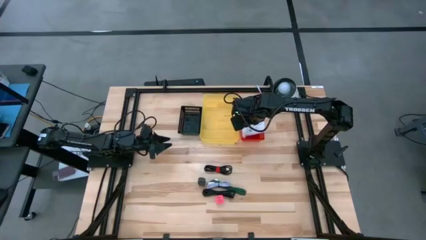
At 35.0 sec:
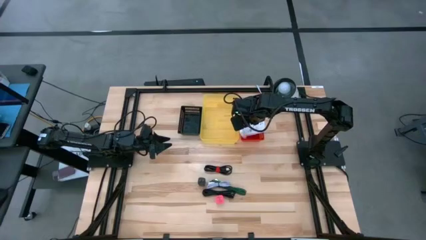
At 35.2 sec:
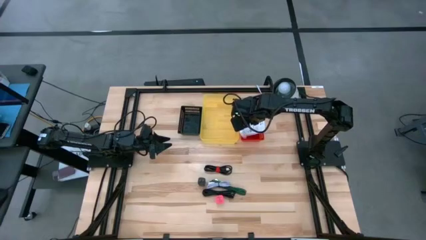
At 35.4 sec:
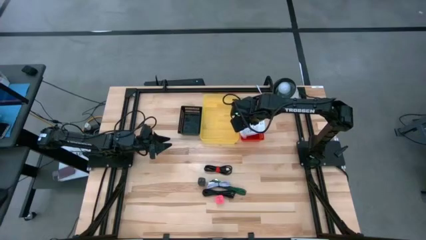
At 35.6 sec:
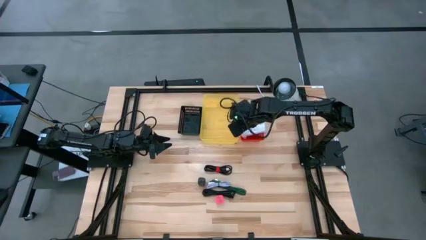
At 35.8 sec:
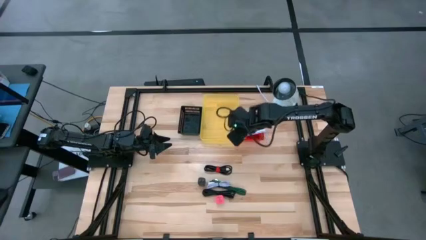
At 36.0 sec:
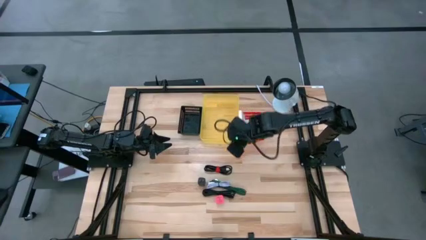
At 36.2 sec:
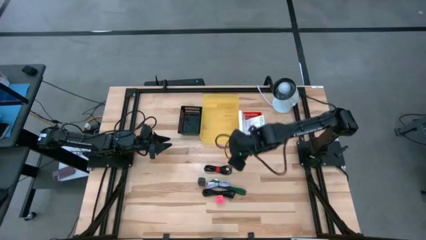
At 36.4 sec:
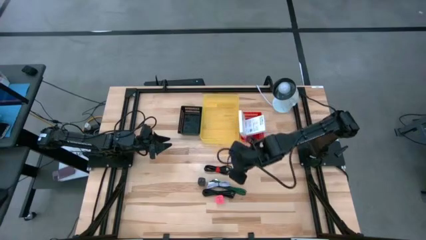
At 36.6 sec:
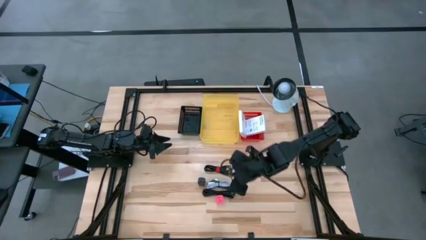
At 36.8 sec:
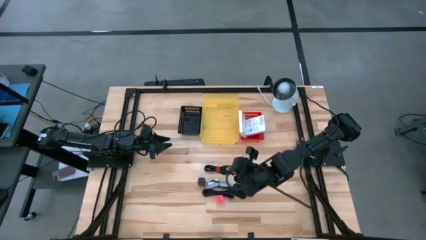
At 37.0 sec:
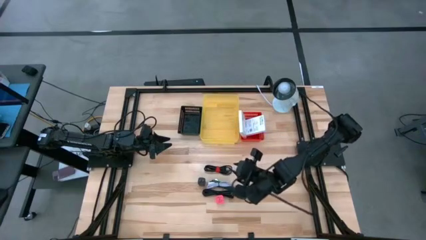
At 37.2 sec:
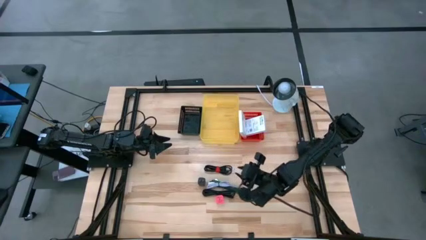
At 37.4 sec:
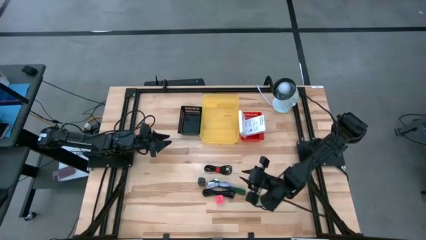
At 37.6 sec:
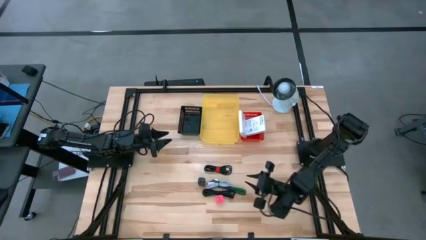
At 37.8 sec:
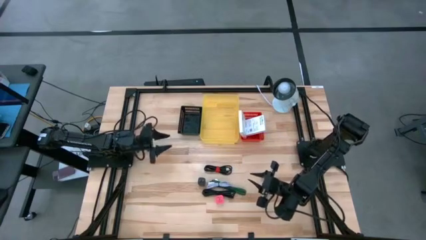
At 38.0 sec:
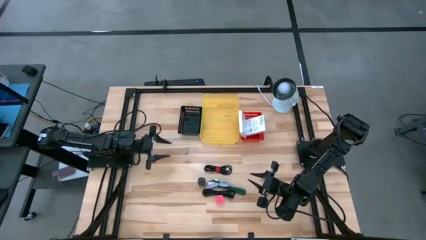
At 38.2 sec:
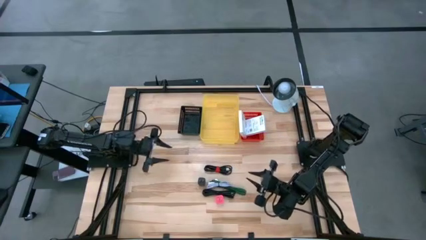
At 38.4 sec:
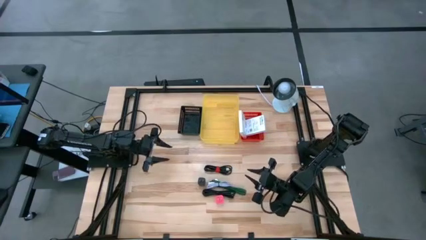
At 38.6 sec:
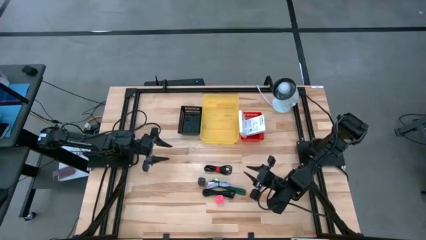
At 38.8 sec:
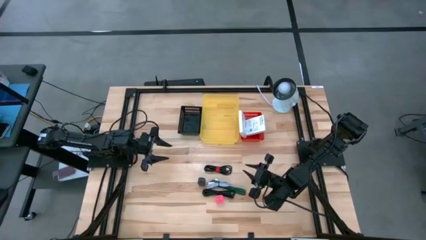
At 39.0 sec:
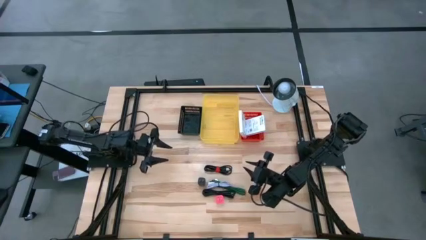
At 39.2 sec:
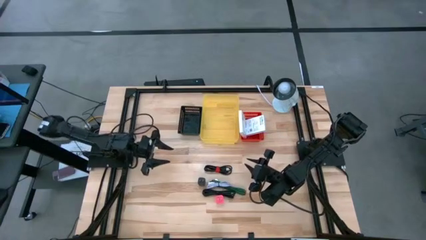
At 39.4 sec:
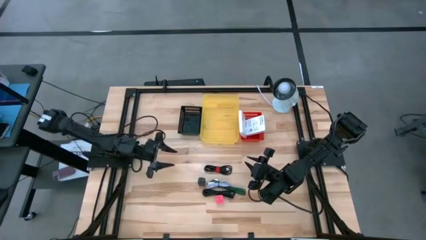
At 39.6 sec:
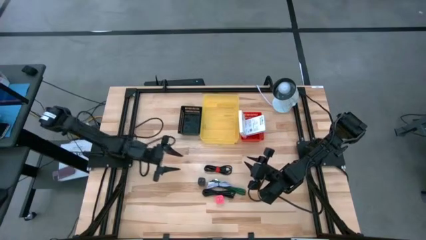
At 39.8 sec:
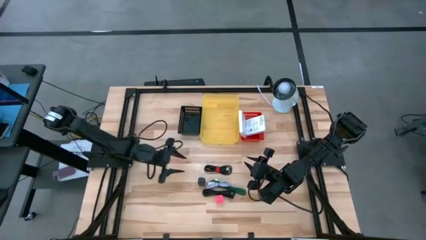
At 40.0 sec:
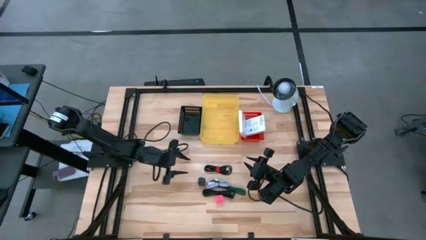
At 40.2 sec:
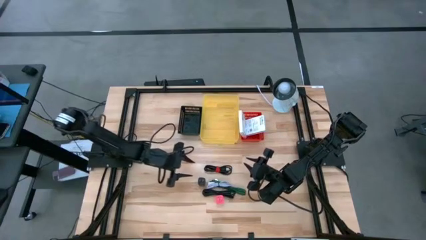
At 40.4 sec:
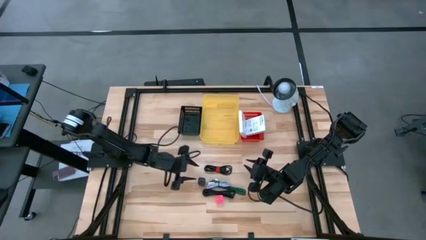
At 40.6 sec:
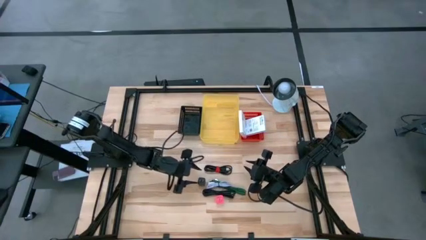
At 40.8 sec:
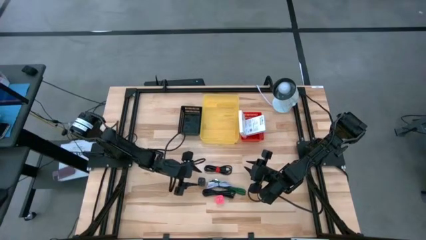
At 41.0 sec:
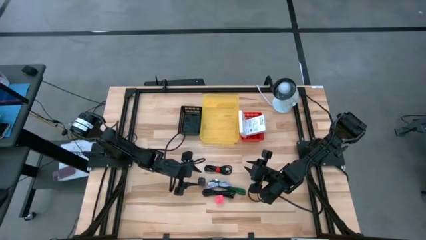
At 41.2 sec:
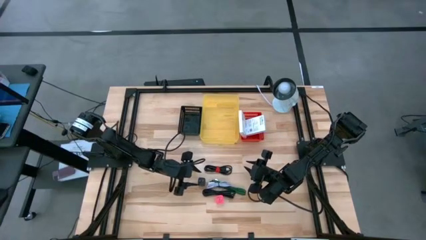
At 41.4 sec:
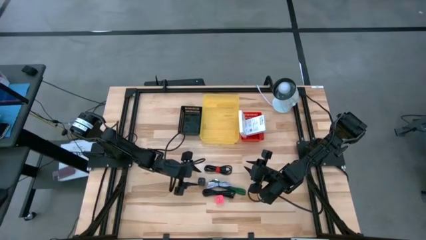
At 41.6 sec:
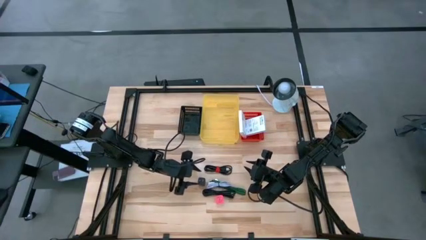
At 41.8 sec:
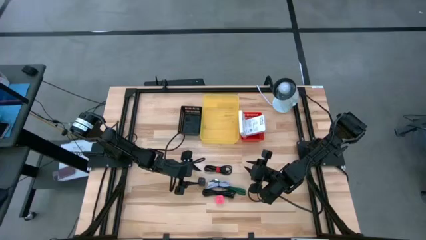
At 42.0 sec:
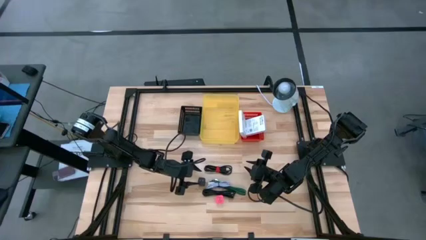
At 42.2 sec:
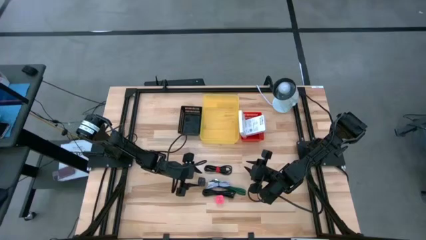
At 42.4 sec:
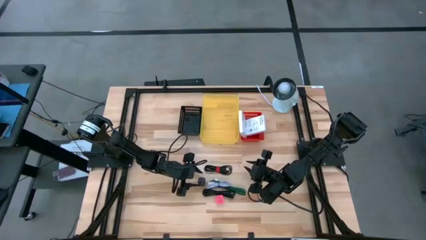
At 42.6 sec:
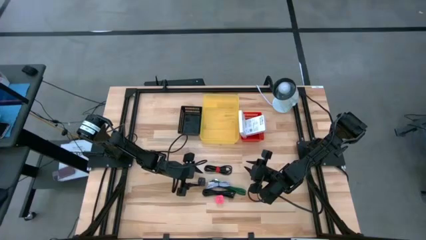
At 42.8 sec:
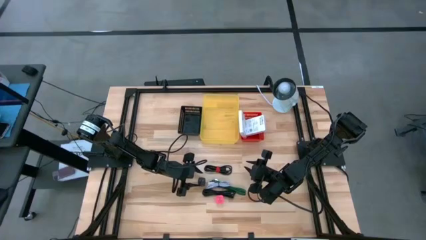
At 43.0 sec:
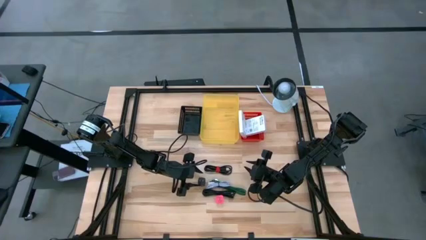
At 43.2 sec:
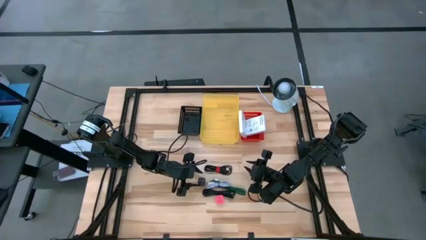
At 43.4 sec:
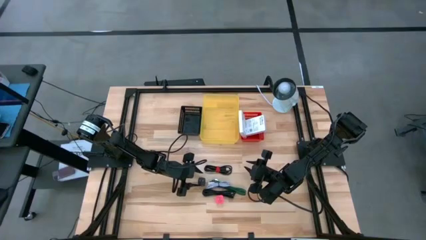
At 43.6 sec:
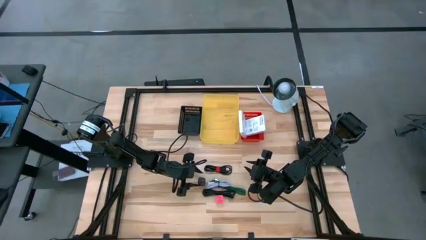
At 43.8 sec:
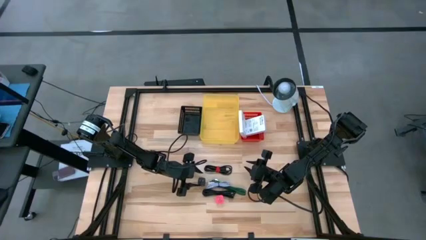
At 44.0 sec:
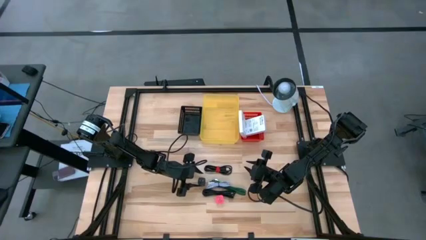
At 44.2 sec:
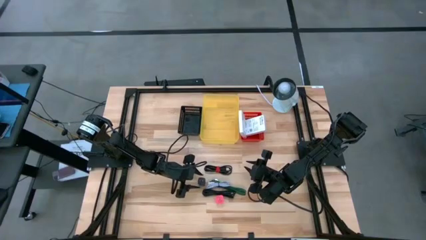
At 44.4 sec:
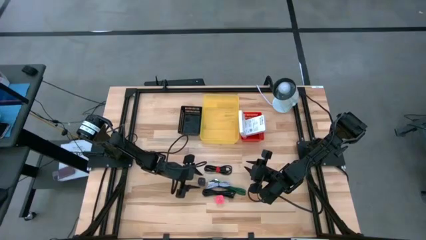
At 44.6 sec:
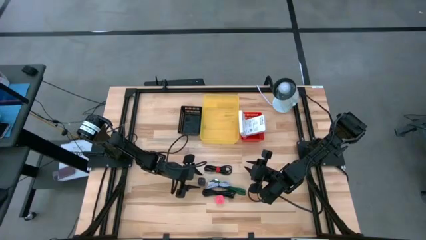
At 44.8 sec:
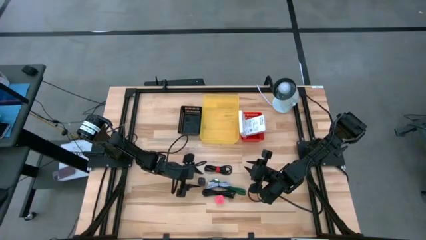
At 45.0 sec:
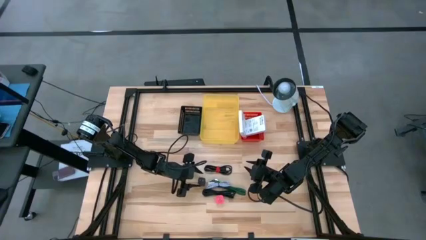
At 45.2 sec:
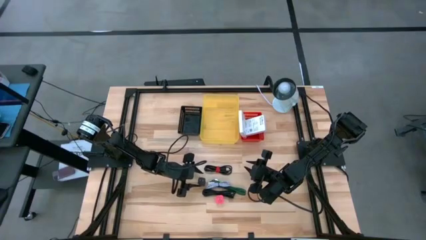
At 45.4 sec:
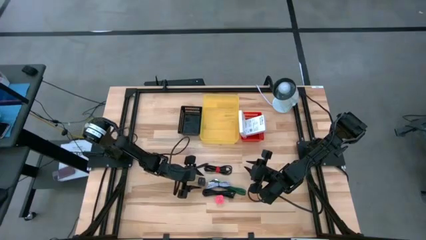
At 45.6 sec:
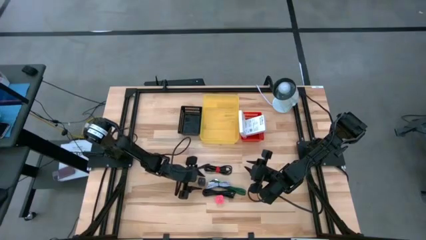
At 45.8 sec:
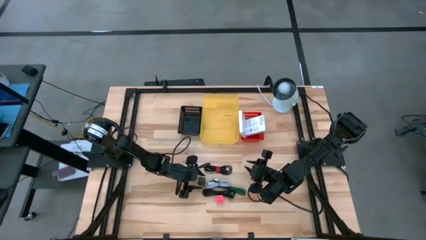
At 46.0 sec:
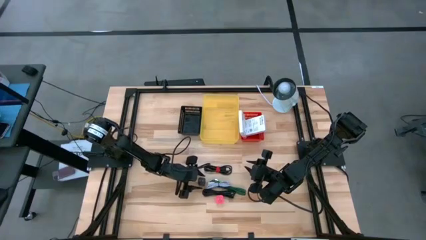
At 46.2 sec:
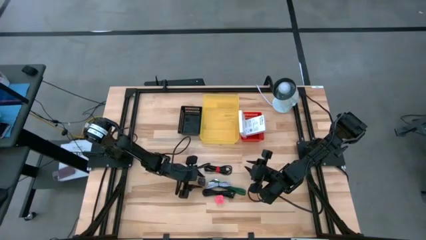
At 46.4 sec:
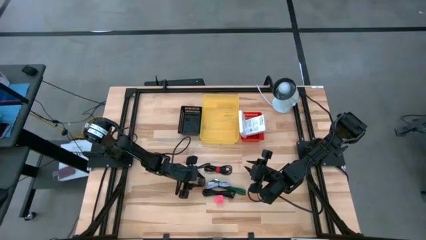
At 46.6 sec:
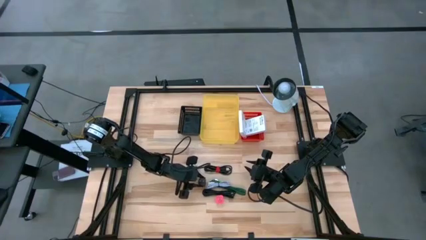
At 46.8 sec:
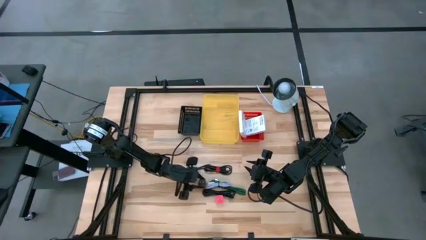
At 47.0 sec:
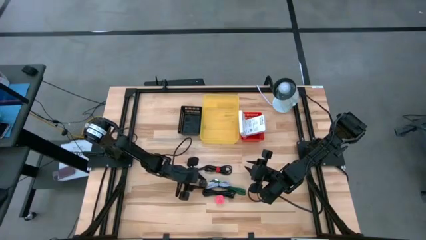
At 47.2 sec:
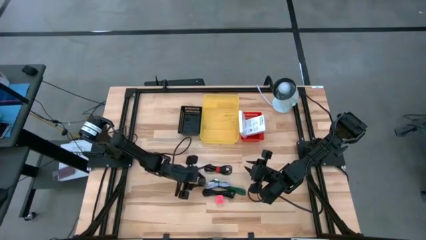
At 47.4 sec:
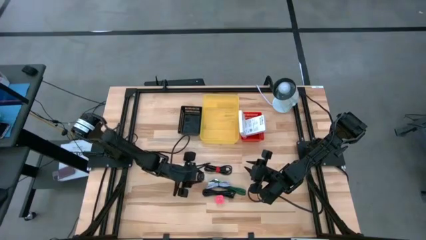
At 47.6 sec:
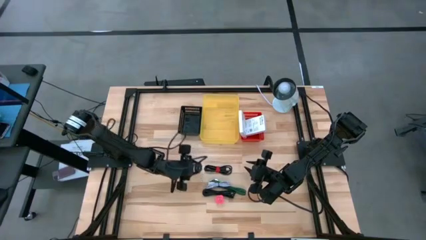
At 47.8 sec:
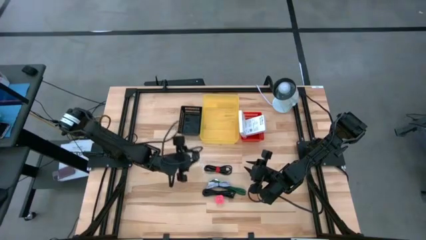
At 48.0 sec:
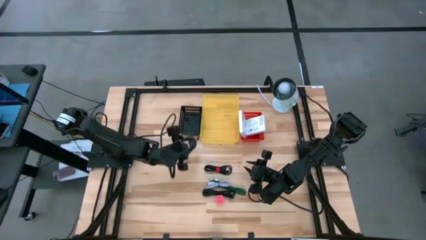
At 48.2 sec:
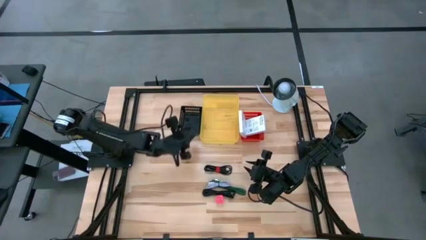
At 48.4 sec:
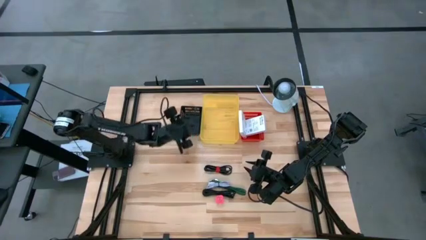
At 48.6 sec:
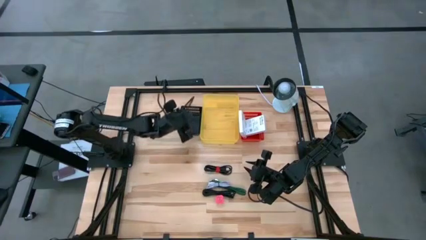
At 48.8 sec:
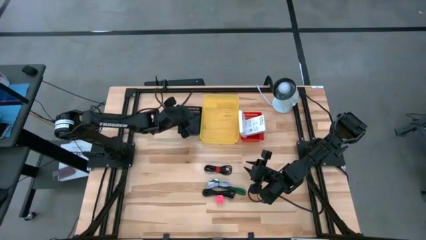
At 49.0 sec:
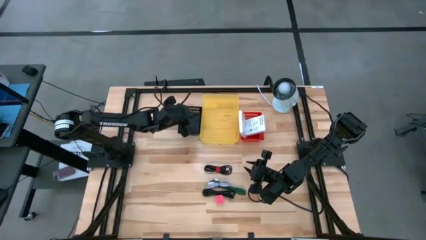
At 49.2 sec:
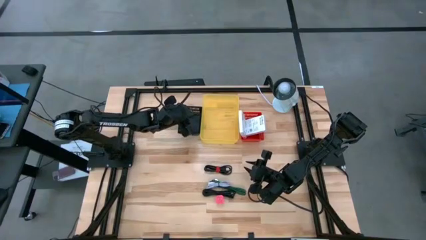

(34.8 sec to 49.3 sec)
Task: Pick and place items into bin
Put the black charger adapter into the black bin
